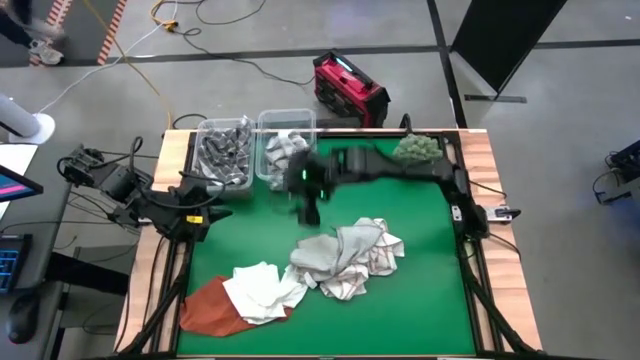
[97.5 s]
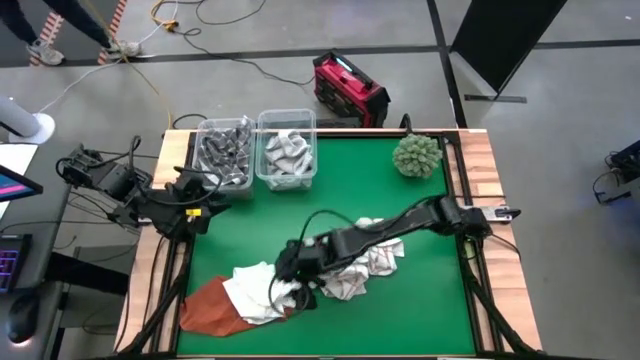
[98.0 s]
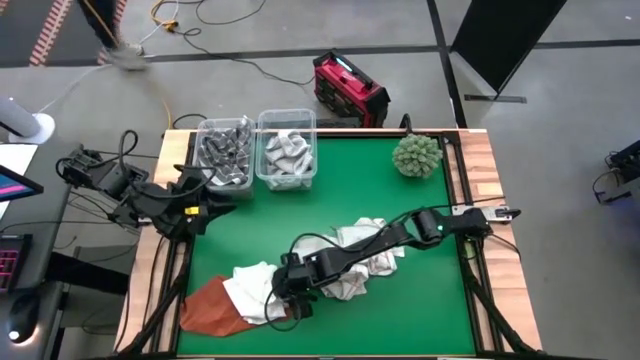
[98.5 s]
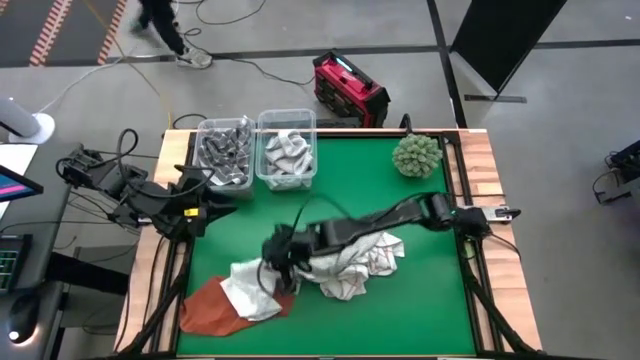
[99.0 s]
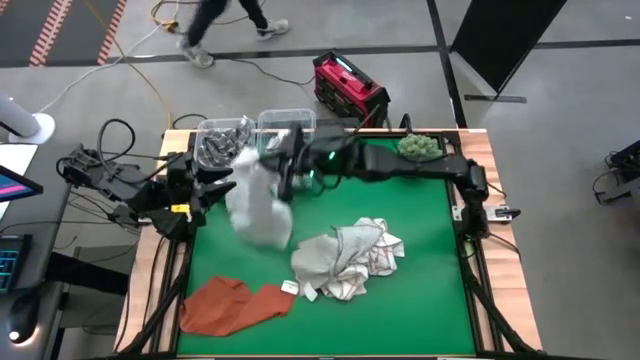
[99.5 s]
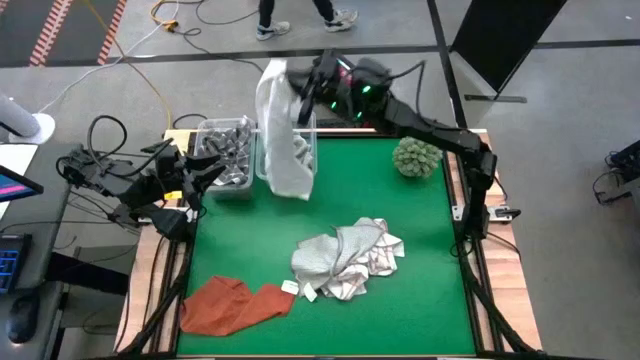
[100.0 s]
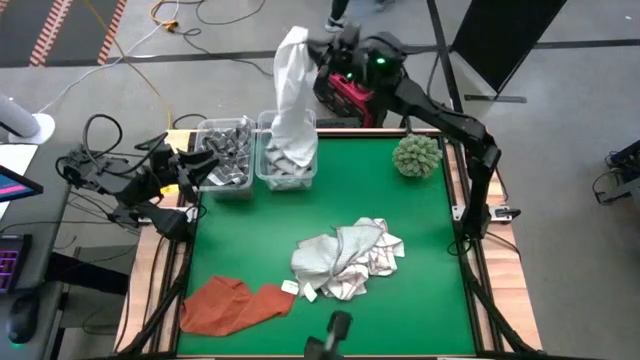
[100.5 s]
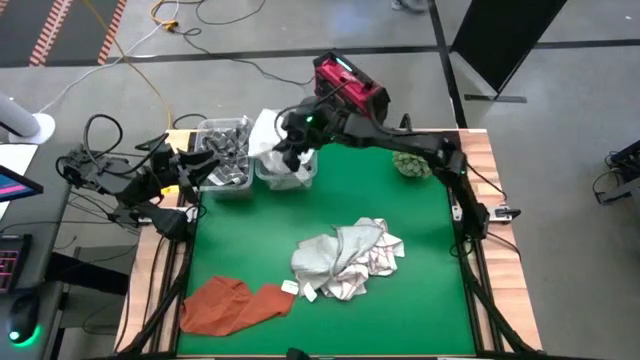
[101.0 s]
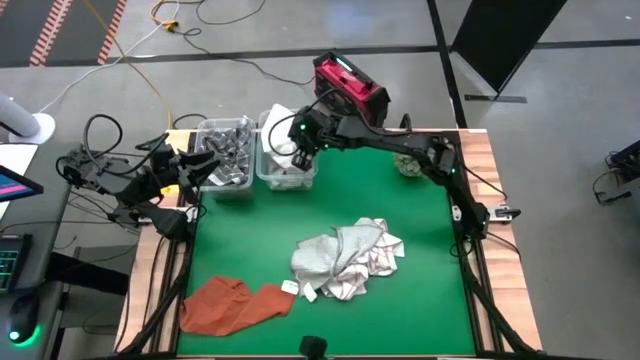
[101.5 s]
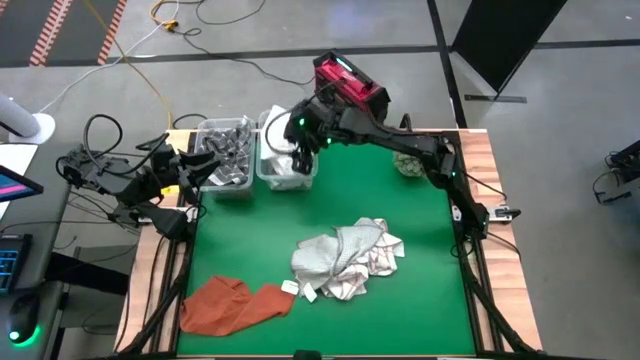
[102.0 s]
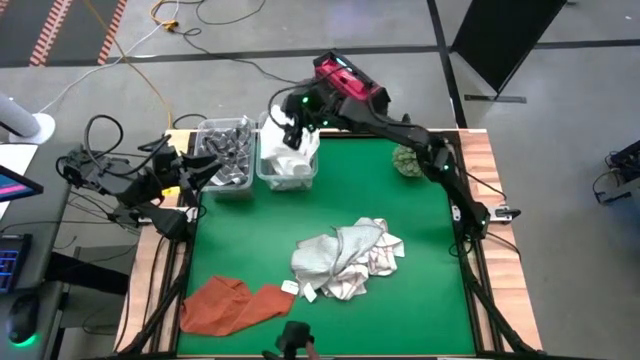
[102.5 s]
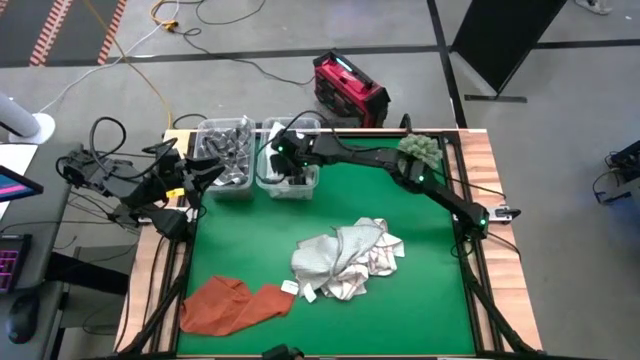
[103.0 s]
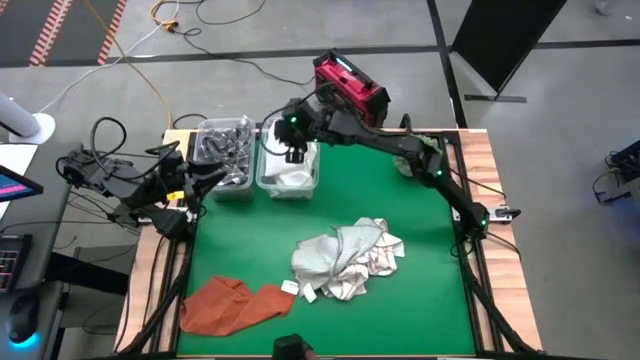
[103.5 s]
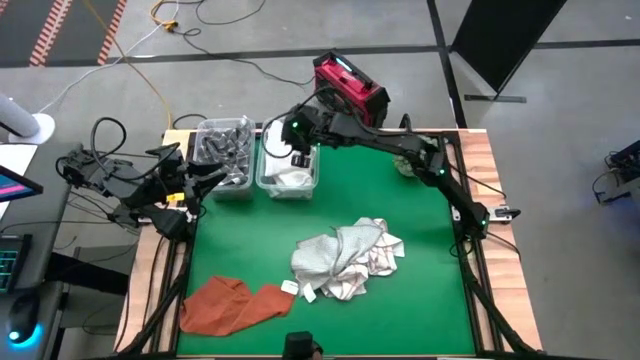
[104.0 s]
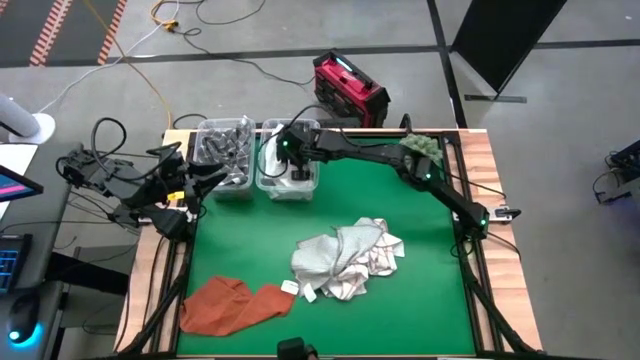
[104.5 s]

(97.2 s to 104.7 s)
Task: Sort towels by color in basket
Put the white towel into the right transparent bin

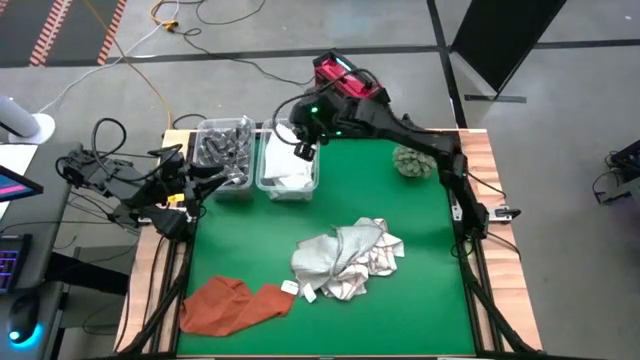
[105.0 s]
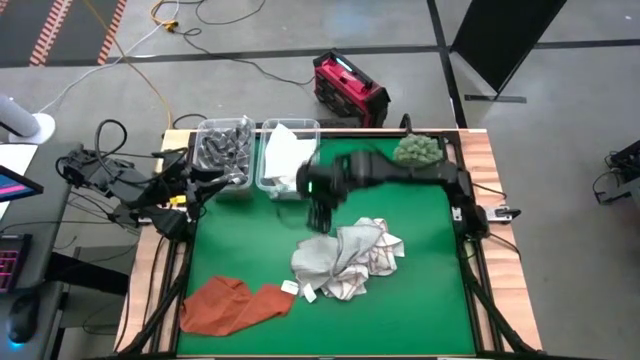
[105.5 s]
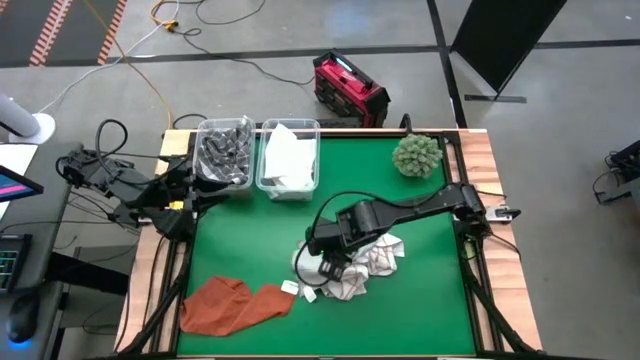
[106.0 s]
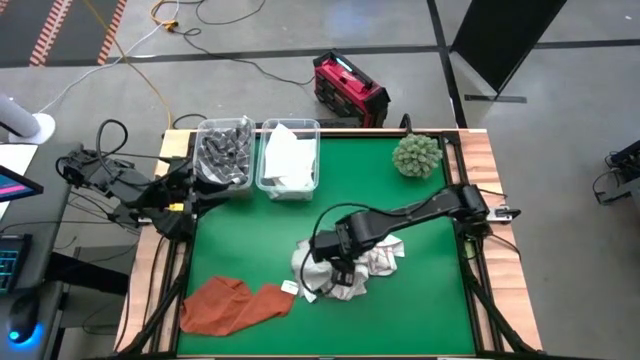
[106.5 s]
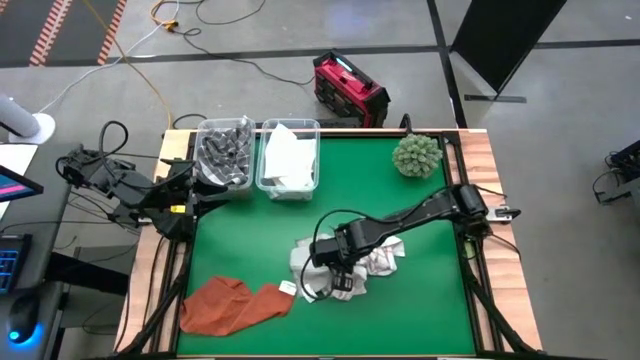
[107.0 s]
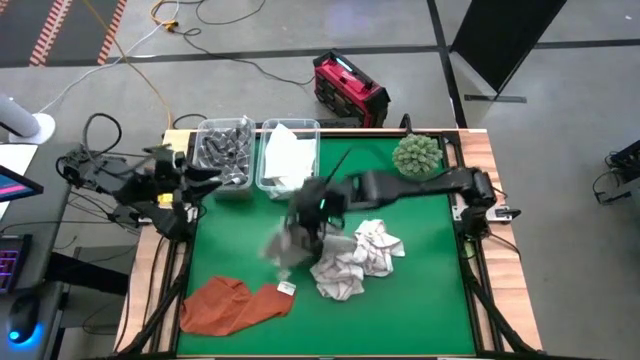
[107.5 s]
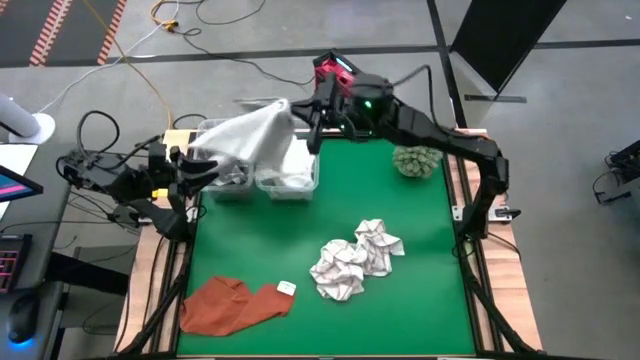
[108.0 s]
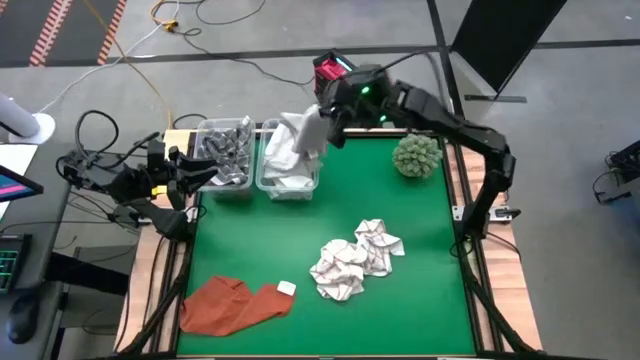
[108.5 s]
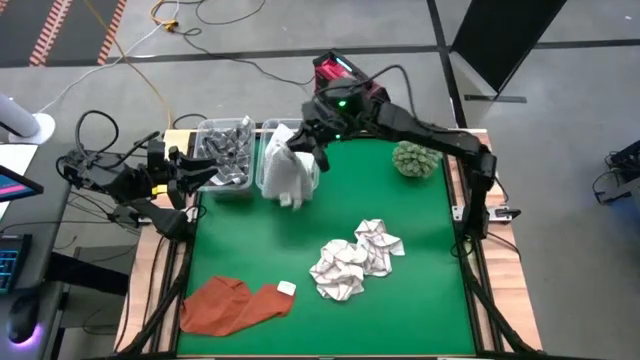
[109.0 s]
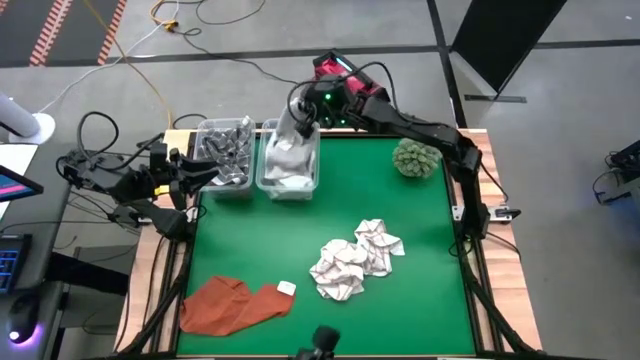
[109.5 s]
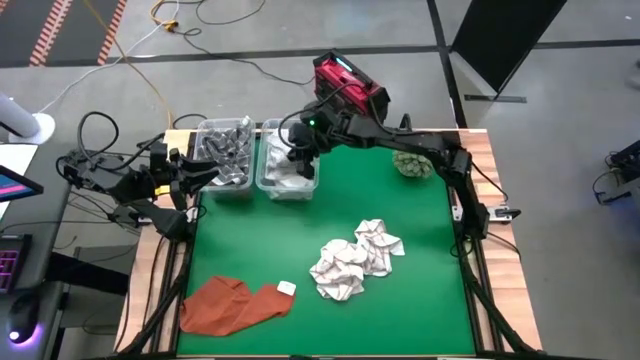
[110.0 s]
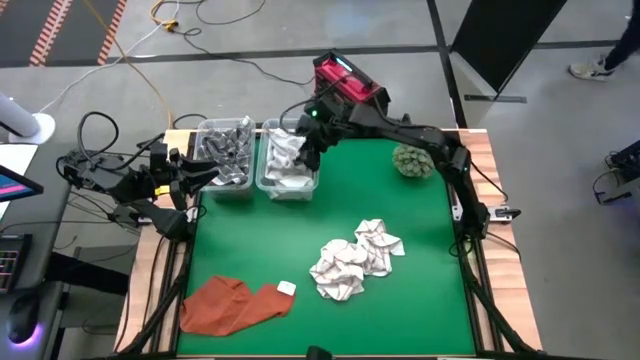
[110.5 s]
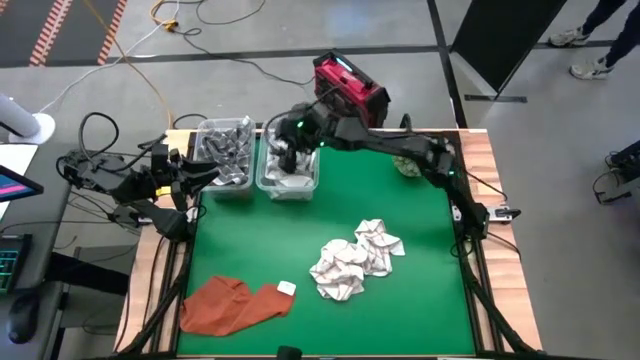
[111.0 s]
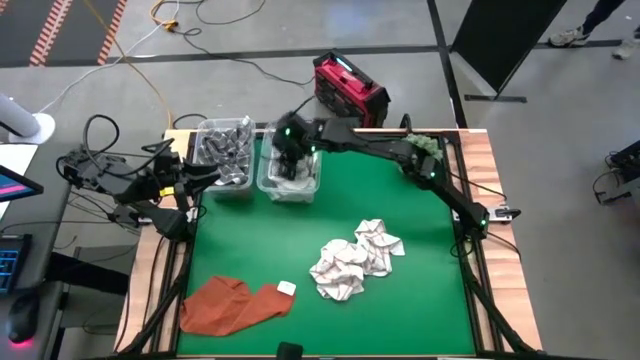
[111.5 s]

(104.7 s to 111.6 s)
Put the light gray towel into the right transparent bin

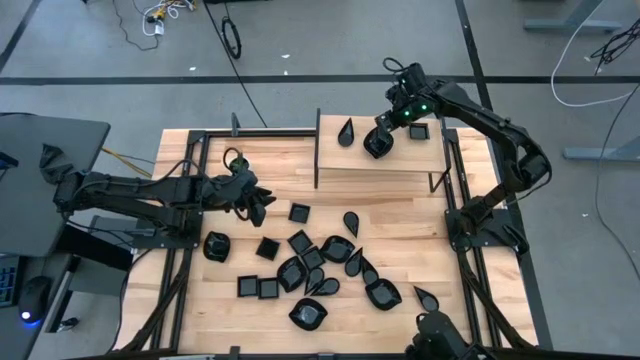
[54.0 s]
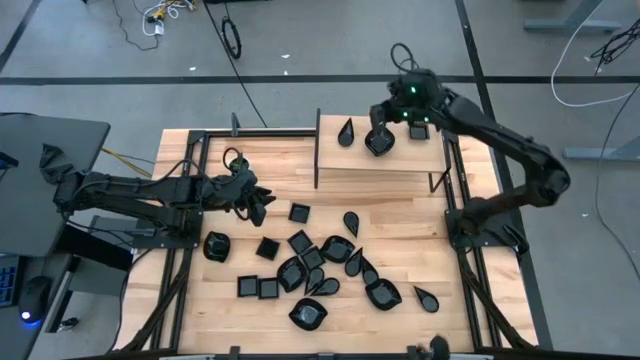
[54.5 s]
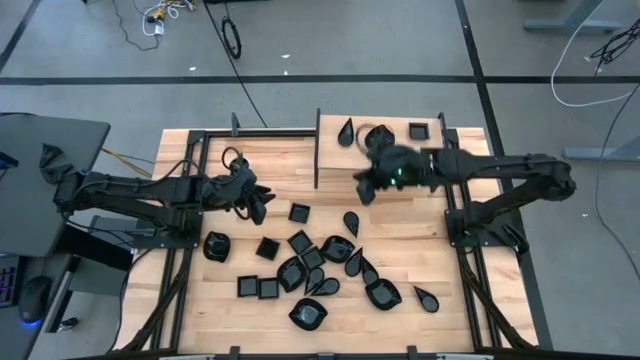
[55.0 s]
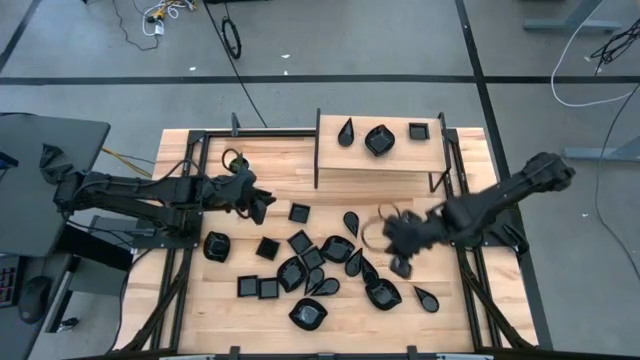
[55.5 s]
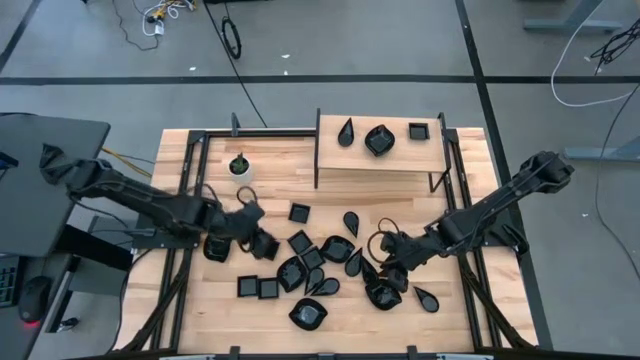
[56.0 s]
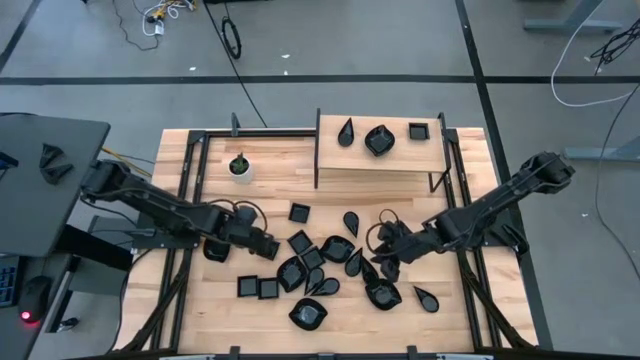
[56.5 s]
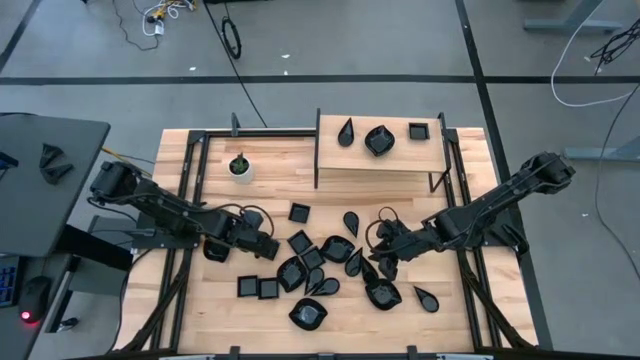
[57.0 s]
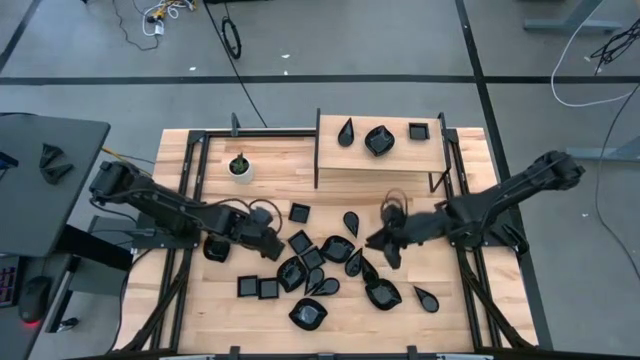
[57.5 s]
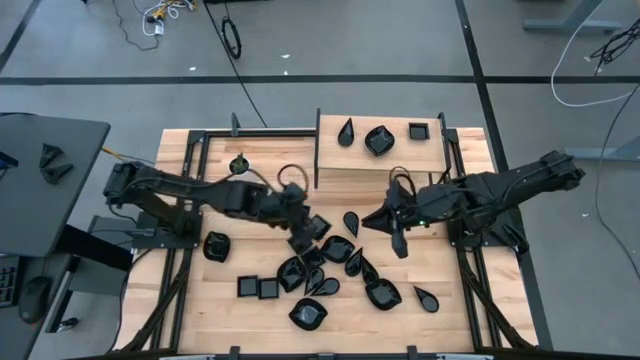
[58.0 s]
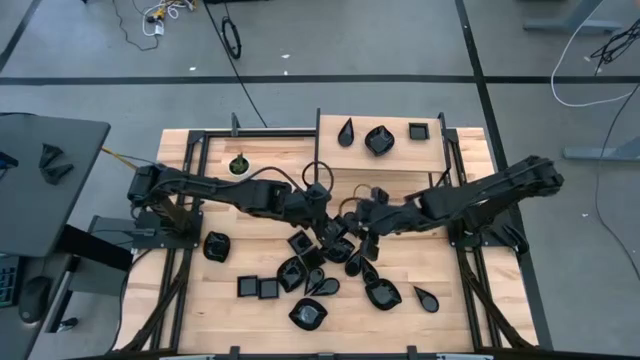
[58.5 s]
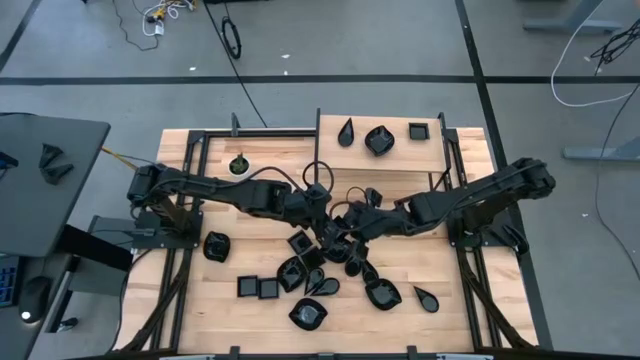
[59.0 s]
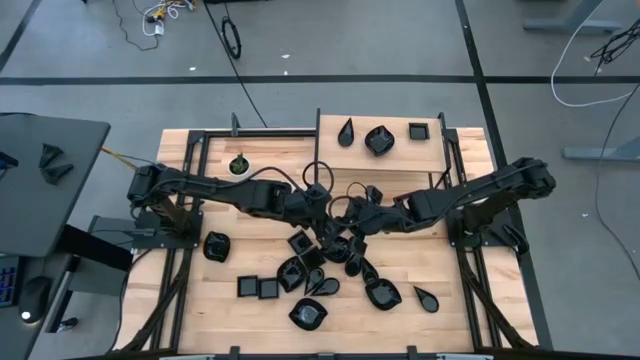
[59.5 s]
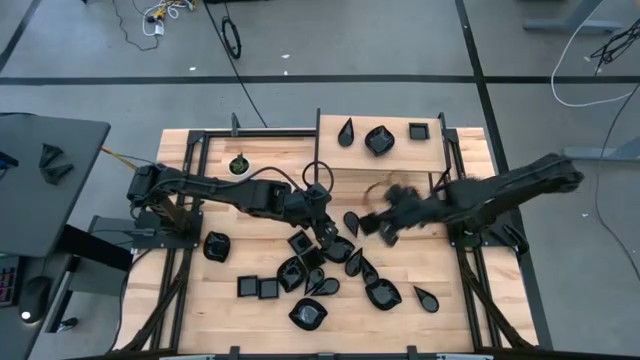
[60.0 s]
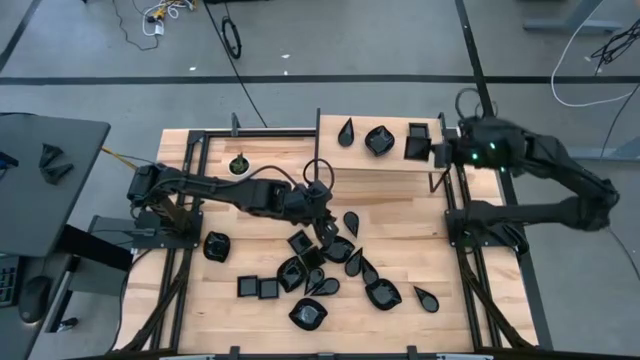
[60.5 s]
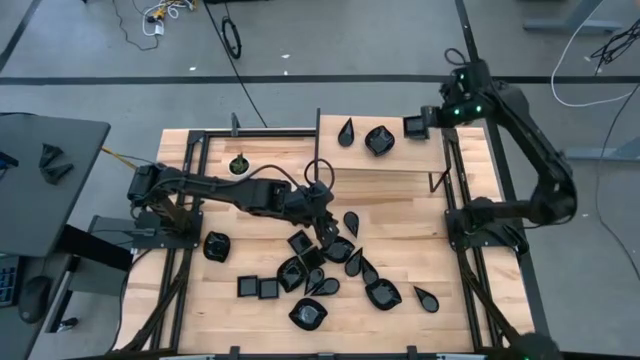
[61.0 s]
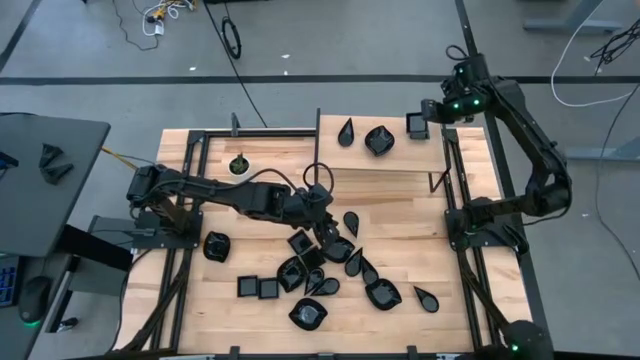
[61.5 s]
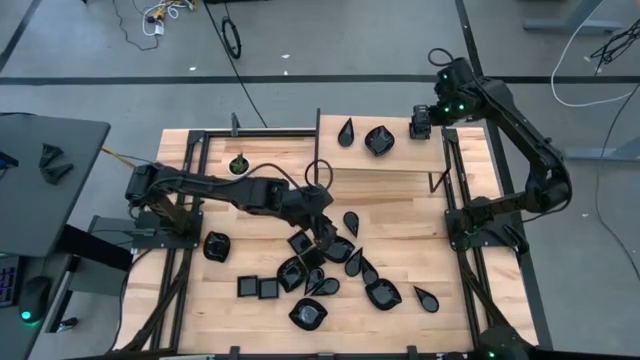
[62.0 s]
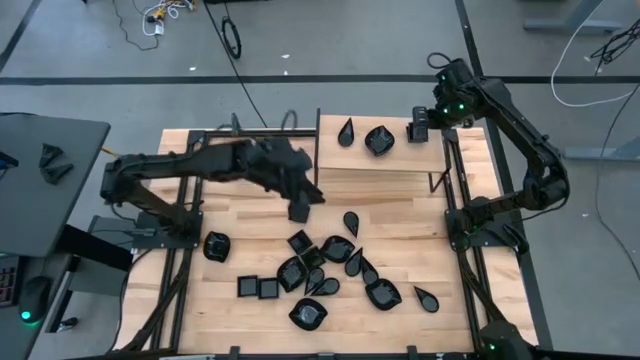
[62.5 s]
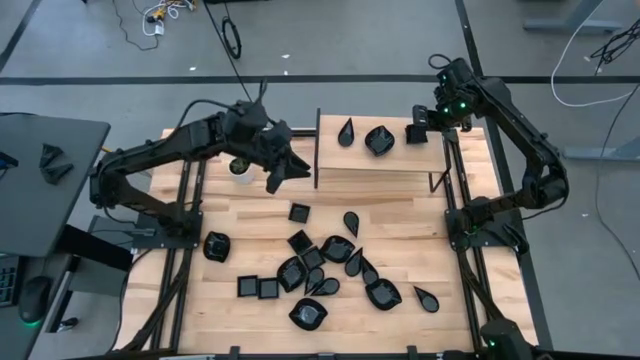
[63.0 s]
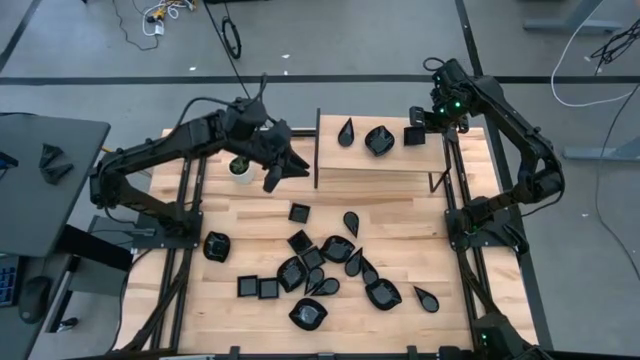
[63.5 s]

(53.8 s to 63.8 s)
Task: Pick & Place Mini shaped plates
Stack the square plate on top of the square plate on the shelf
